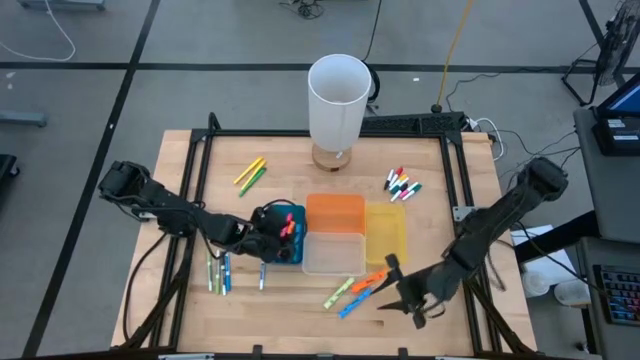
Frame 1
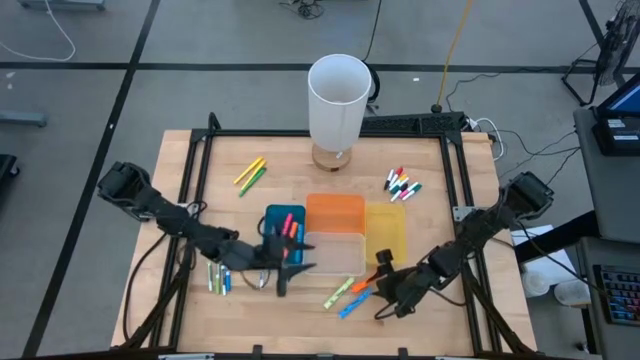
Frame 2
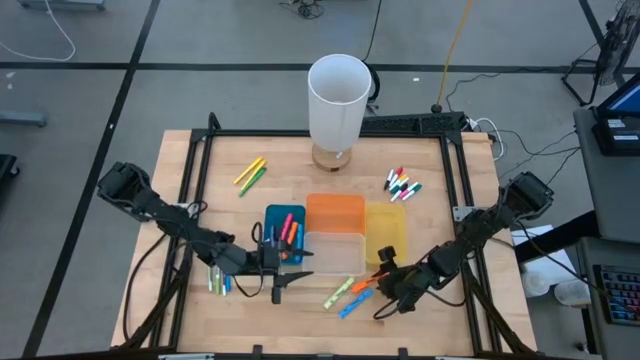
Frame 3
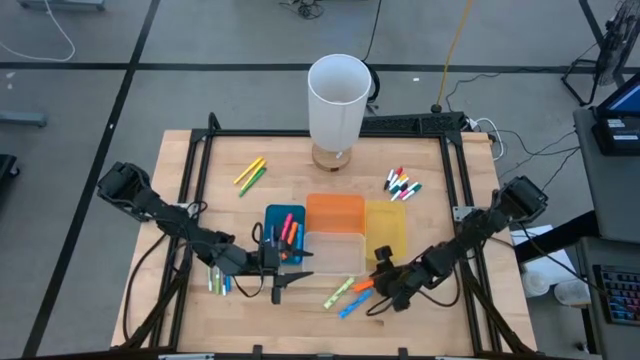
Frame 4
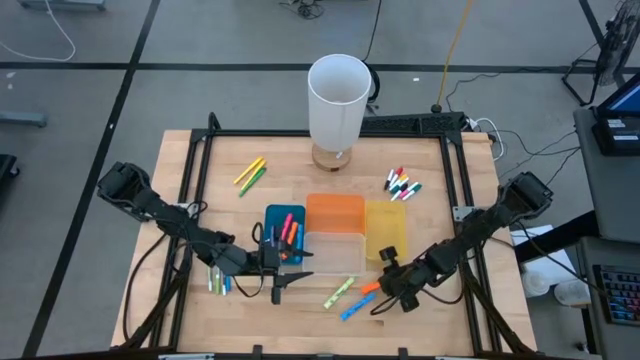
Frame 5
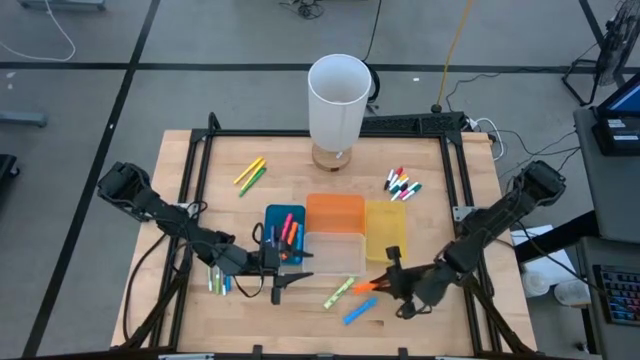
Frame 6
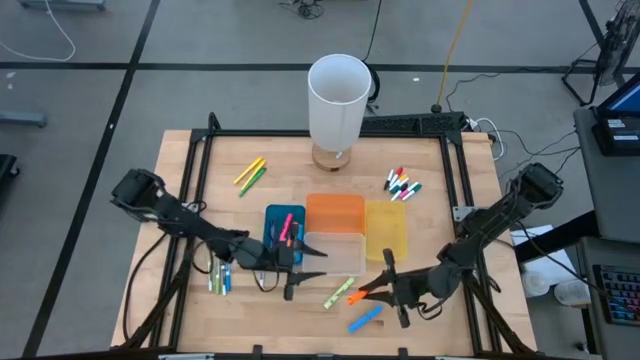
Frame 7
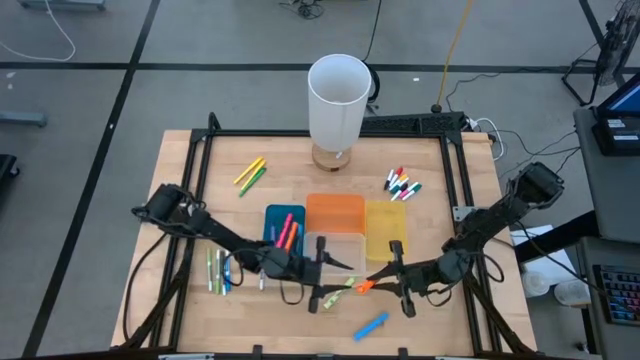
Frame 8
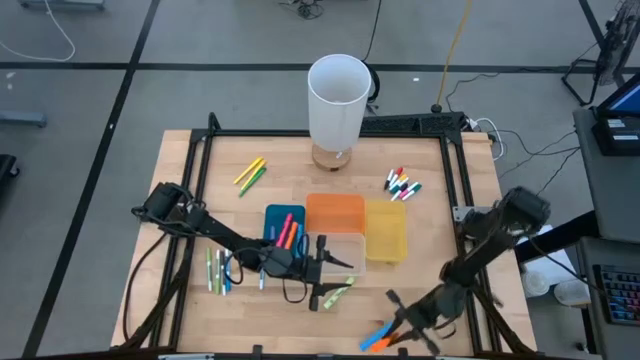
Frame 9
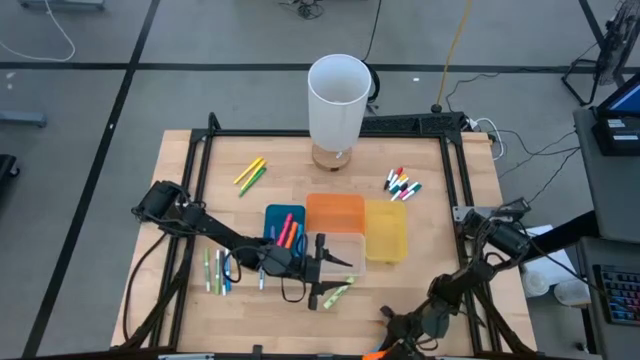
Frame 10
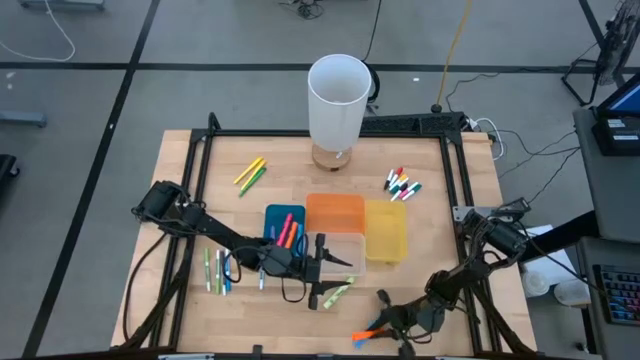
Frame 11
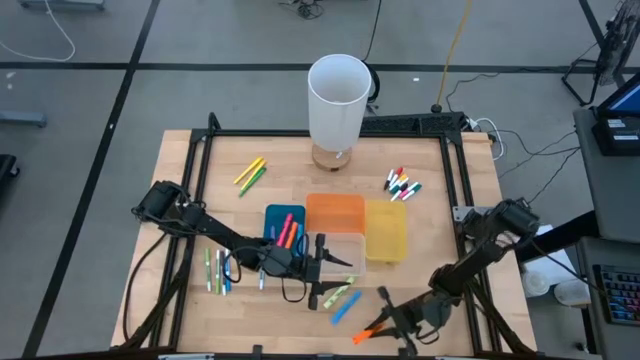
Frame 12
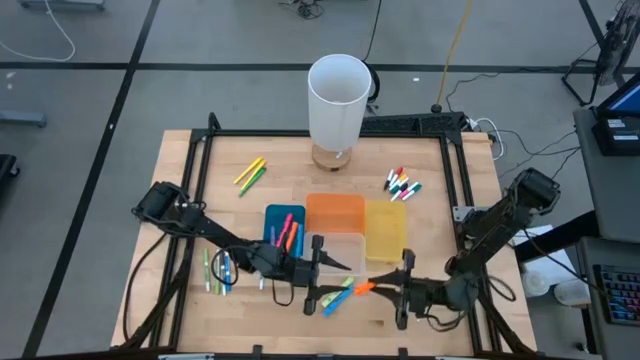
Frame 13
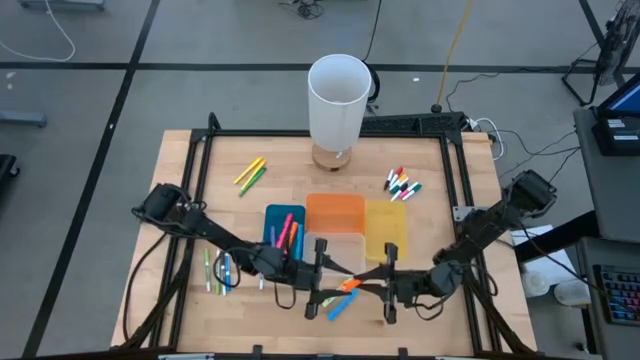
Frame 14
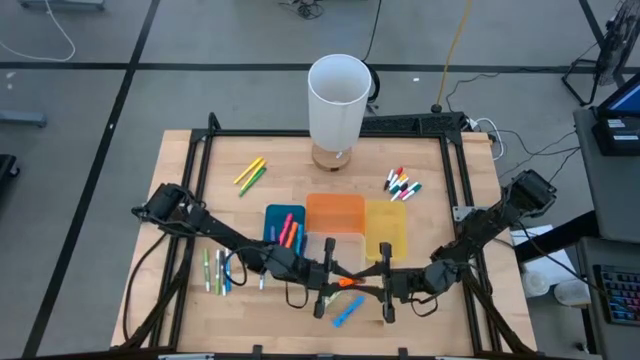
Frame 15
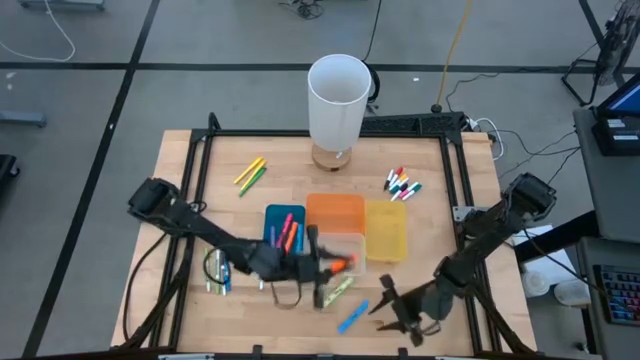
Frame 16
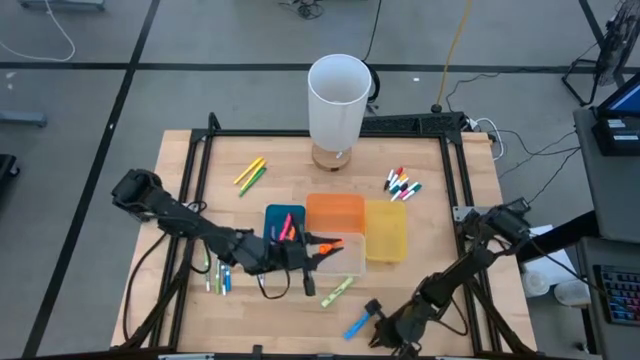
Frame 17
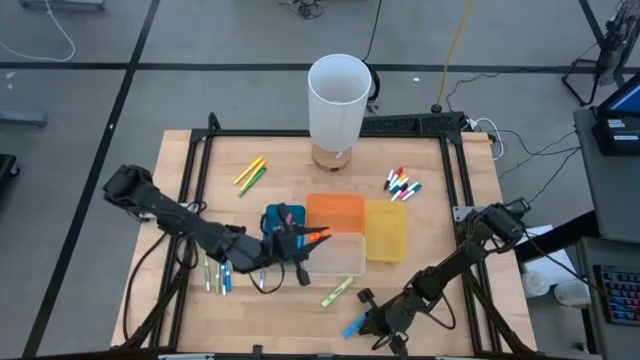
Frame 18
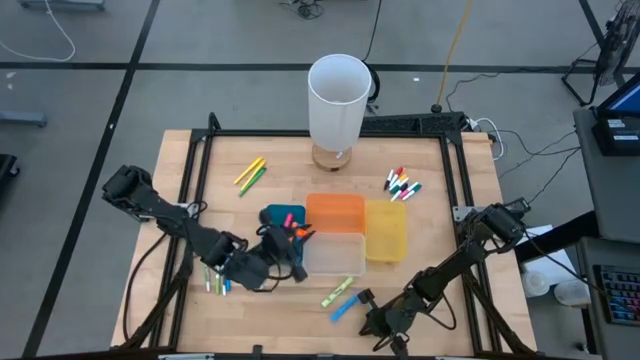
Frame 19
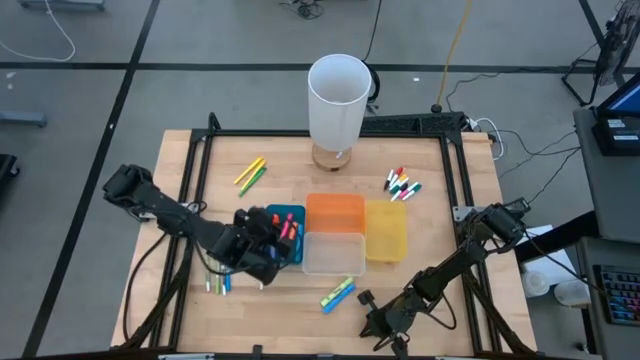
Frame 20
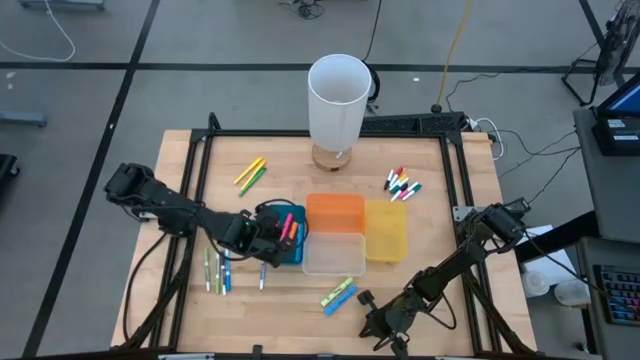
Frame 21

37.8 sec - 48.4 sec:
Task: Pick & Place Markers
Put the large orange highlighter pen into the blue bin

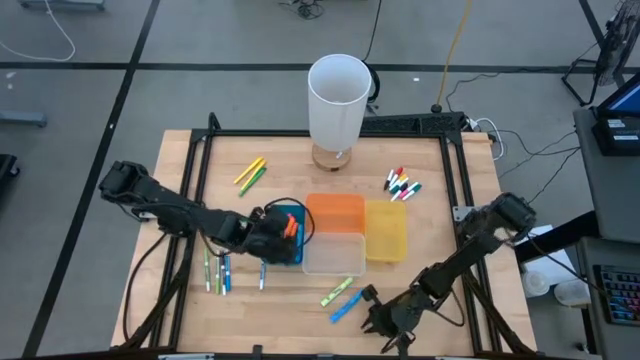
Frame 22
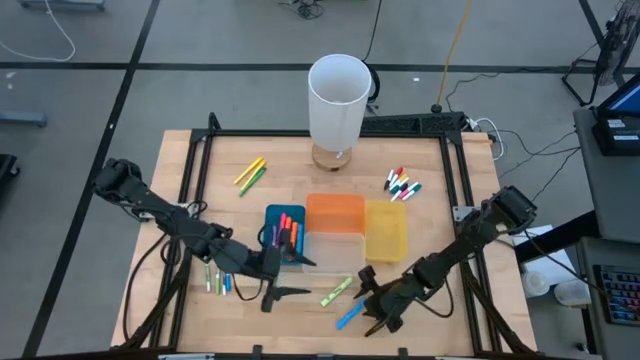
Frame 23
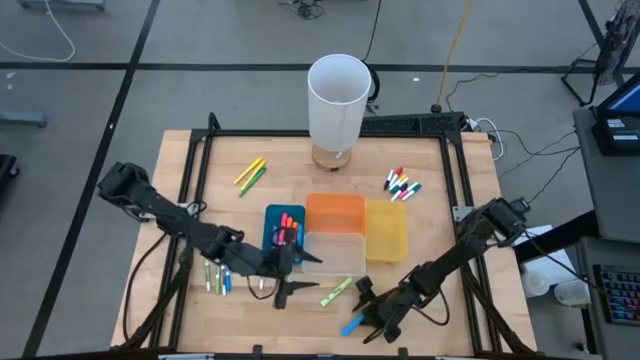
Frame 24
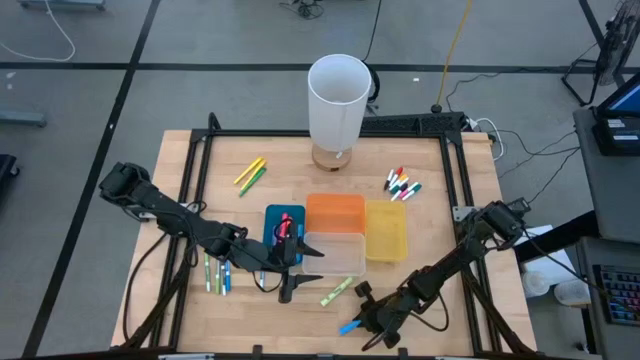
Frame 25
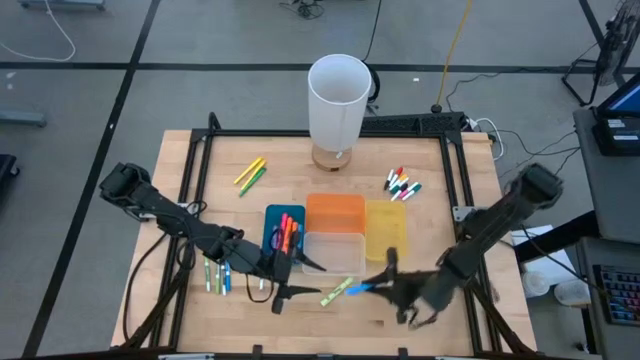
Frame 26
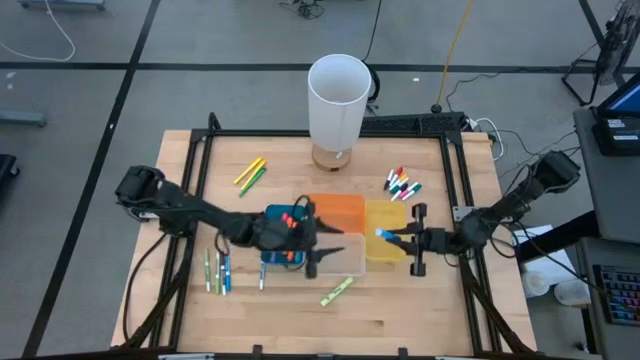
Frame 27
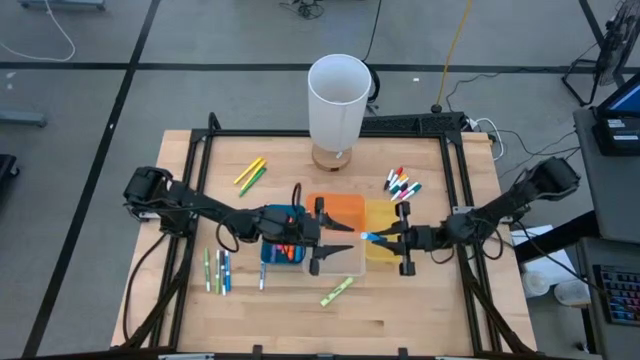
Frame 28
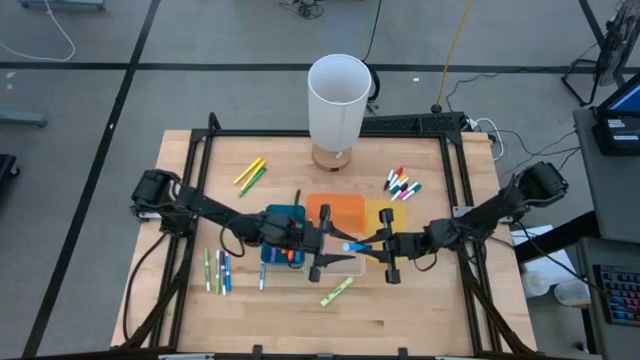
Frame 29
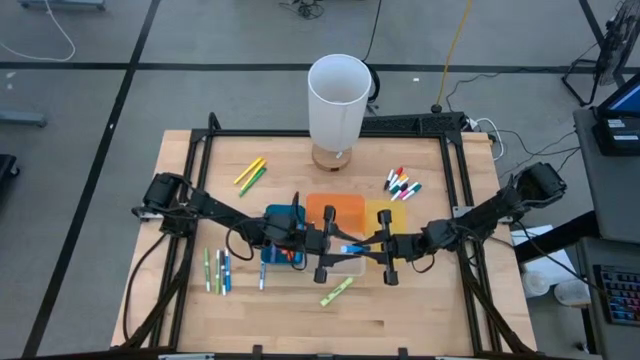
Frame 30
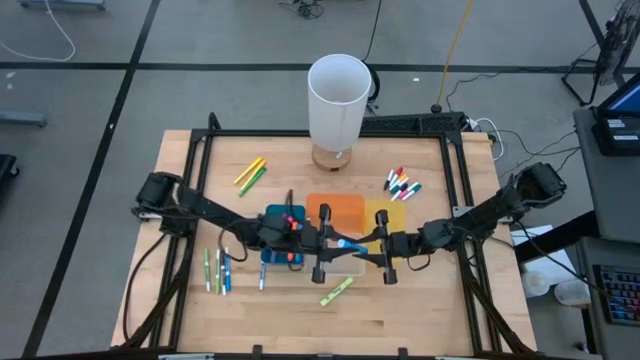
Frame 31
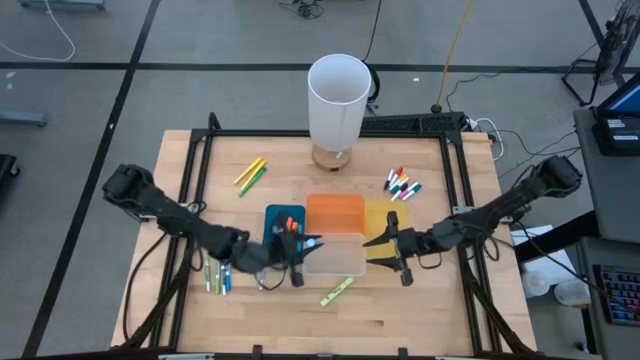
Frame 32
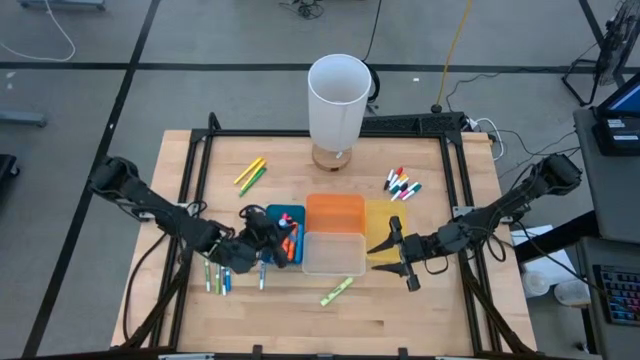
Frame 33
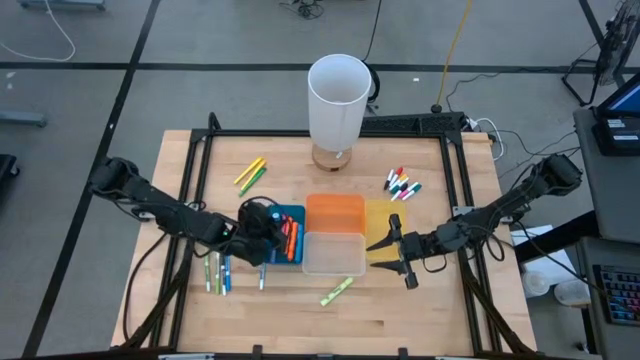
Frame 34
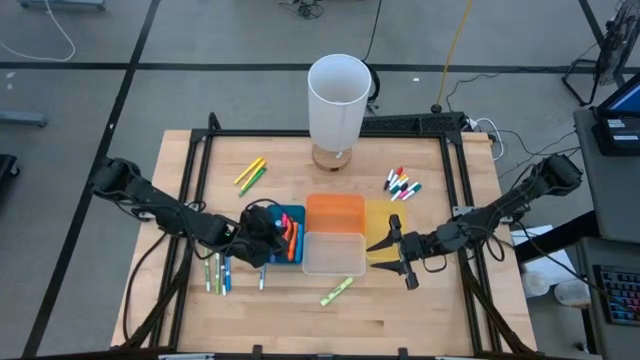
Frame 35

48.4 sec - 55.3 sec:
Put the large blue highlighter pen into the blue bin

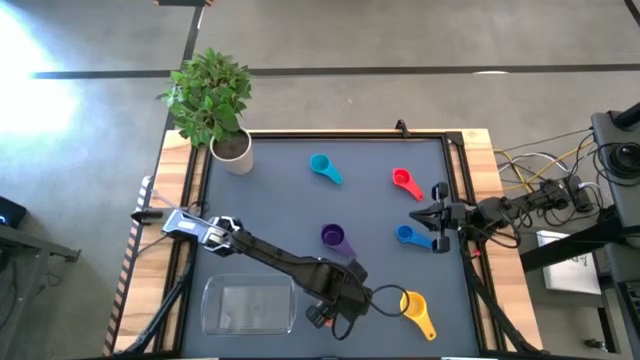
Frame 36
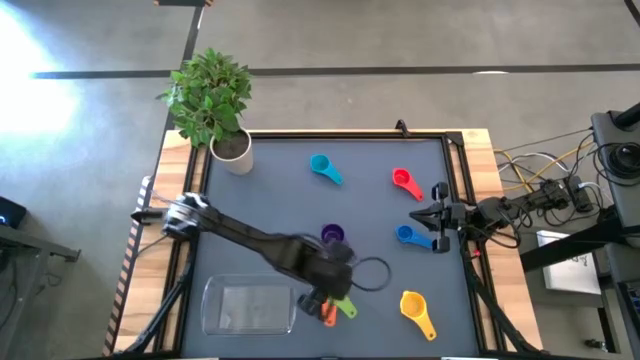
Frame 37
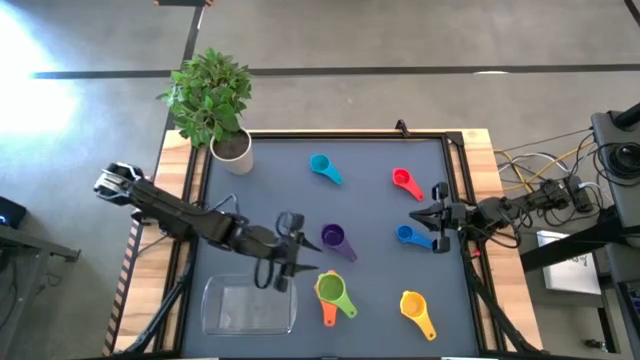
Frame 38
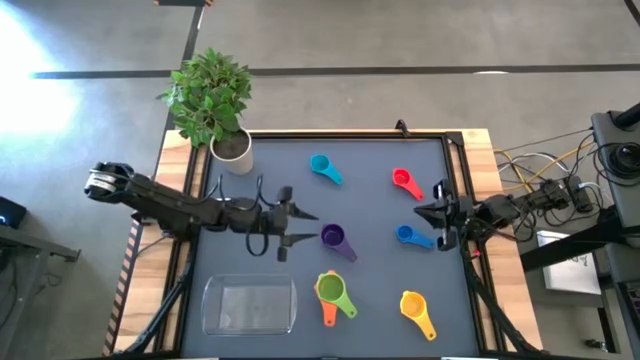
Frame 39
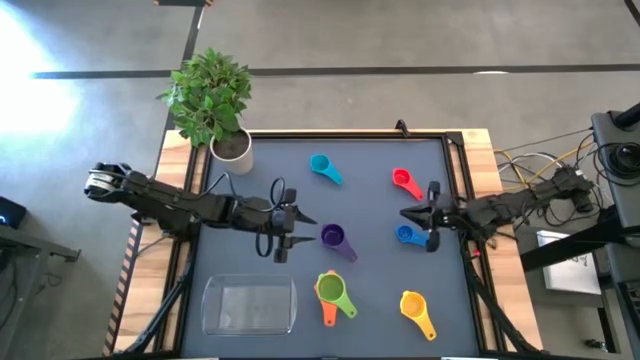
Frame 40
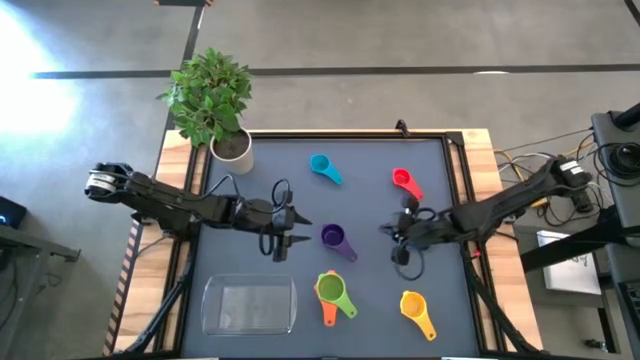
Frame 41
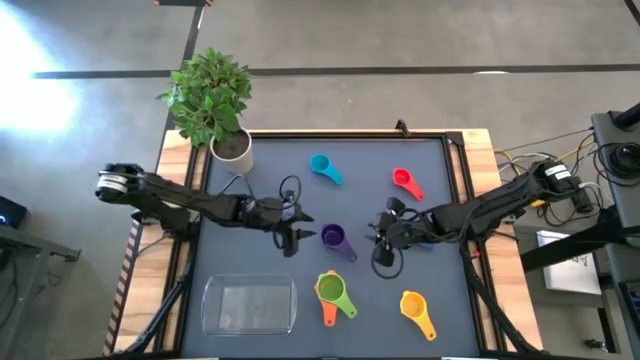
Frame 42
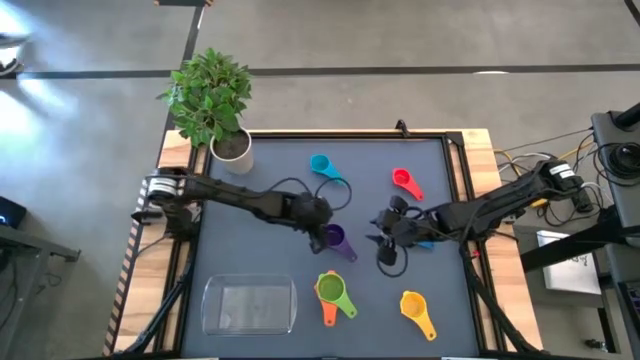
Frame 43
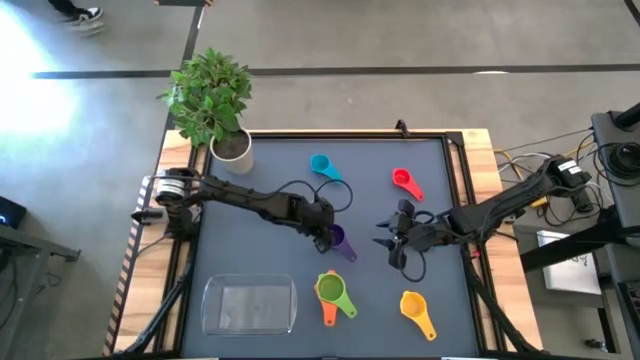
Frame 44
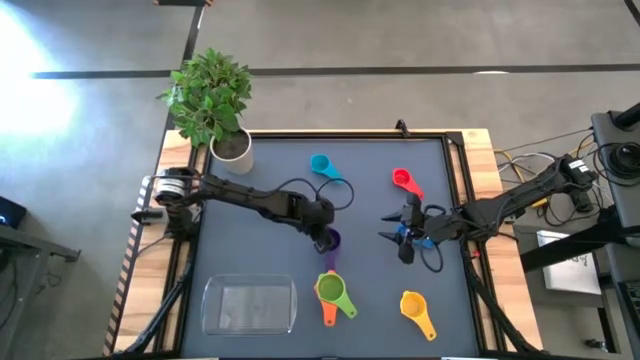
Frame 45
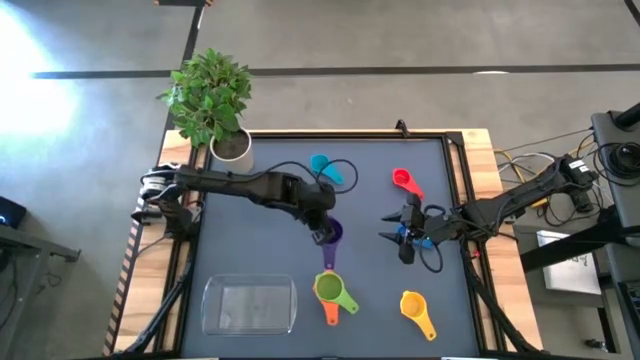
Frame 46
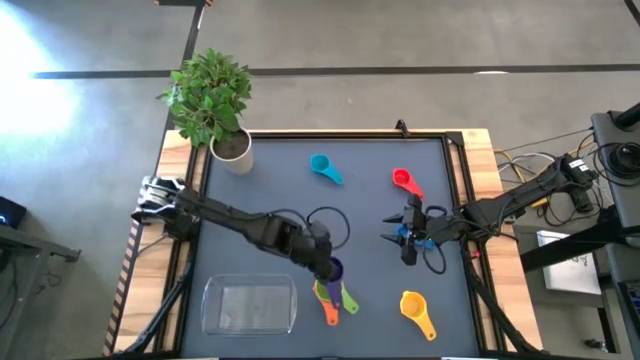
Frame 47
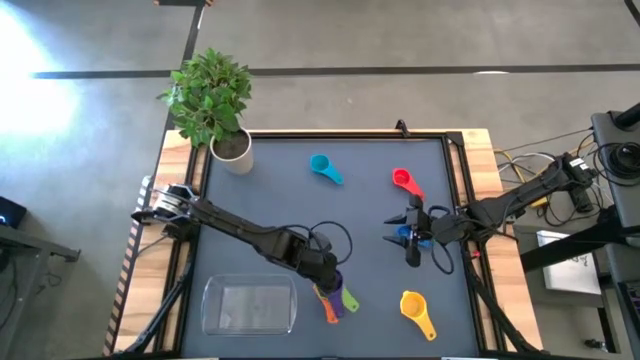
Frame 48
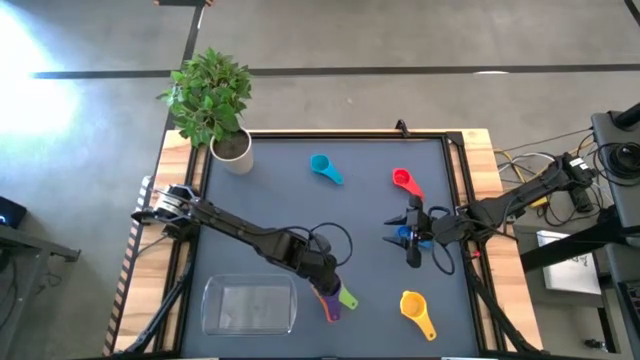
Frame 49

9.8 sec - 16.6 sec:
Task: Nest measuring cups in basket
Stack the purple measuring cup on top of the green measuring cup
